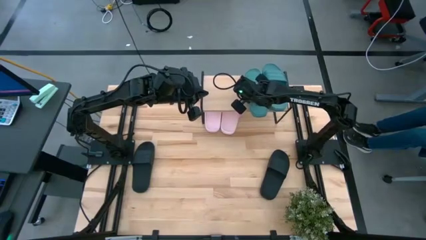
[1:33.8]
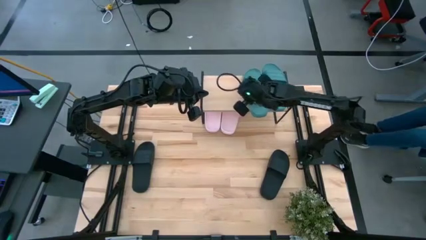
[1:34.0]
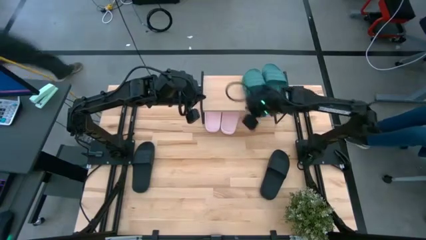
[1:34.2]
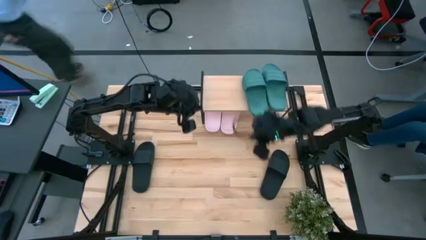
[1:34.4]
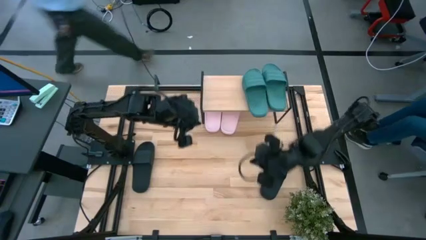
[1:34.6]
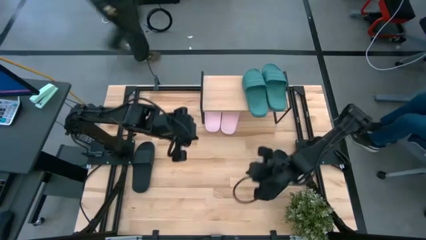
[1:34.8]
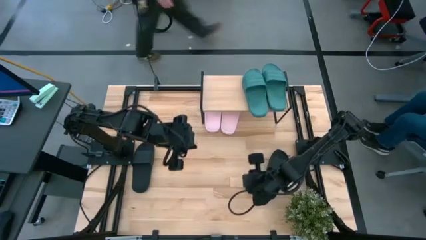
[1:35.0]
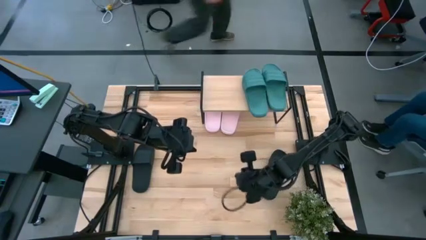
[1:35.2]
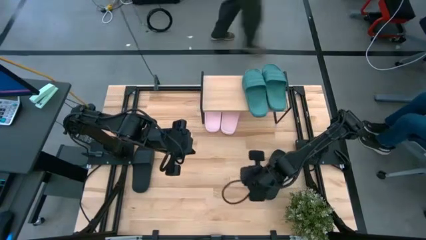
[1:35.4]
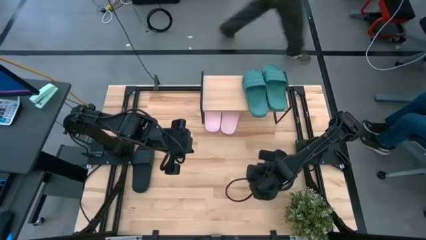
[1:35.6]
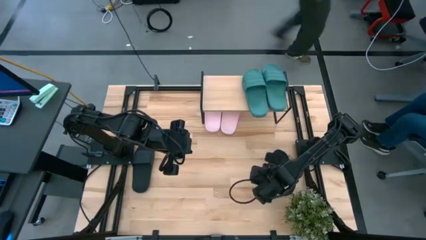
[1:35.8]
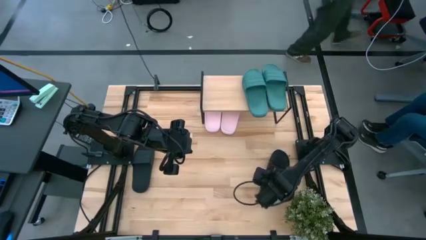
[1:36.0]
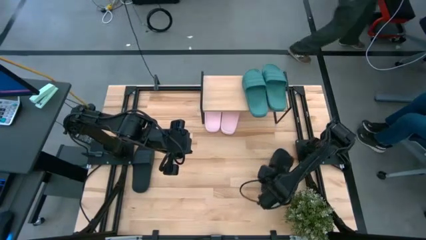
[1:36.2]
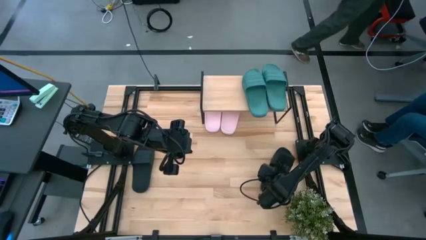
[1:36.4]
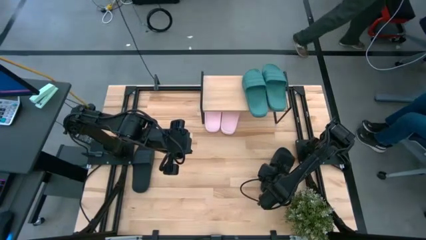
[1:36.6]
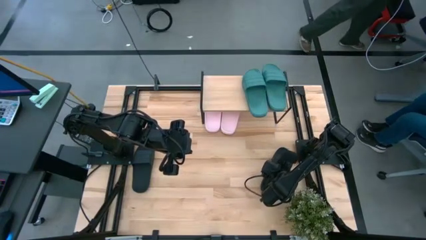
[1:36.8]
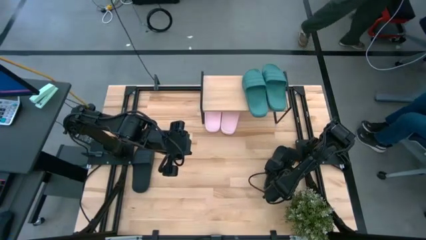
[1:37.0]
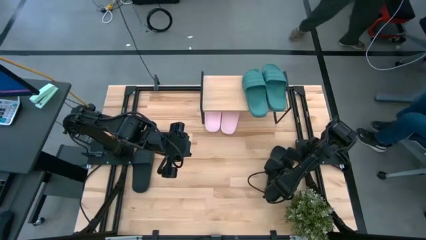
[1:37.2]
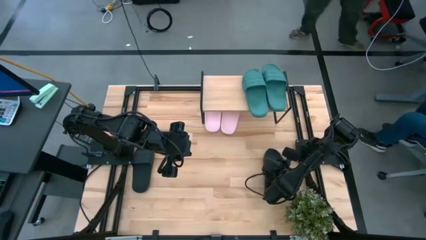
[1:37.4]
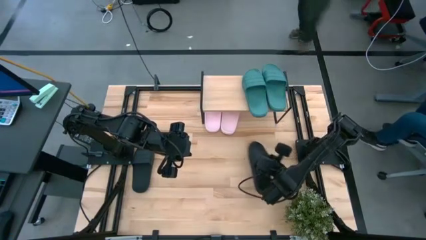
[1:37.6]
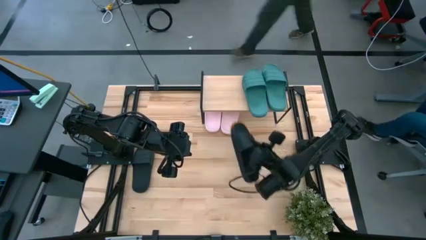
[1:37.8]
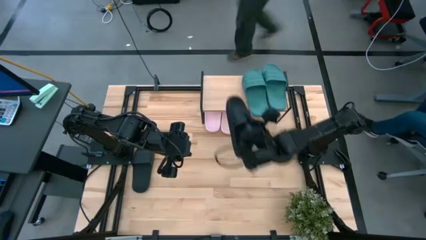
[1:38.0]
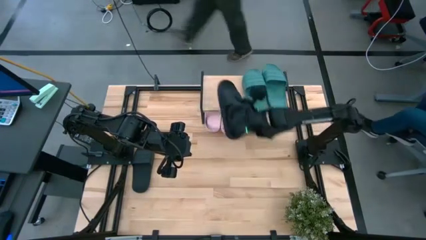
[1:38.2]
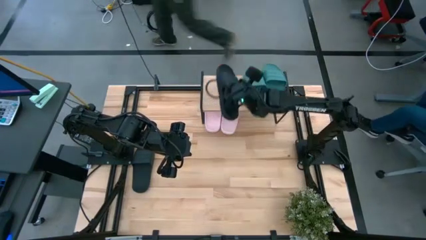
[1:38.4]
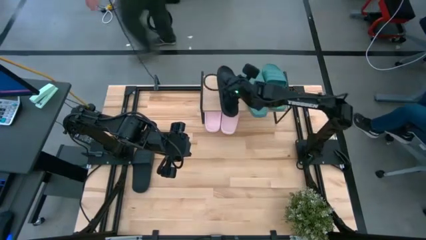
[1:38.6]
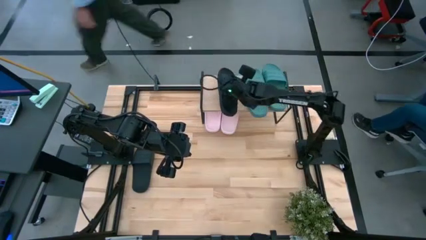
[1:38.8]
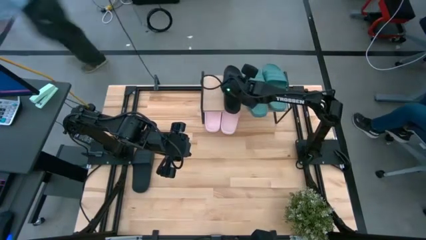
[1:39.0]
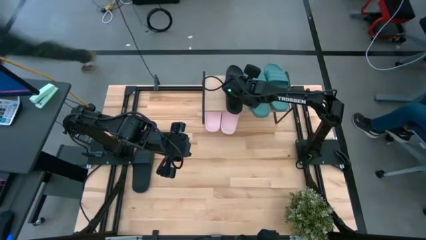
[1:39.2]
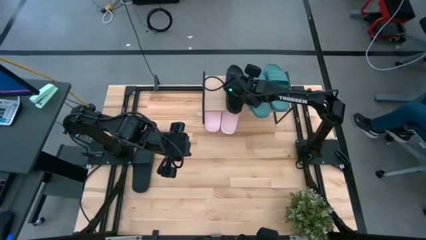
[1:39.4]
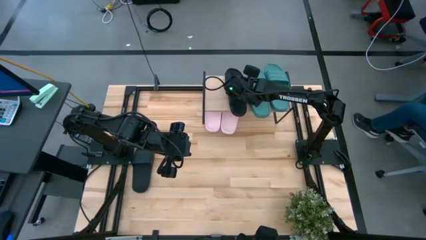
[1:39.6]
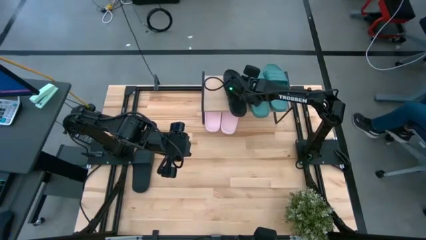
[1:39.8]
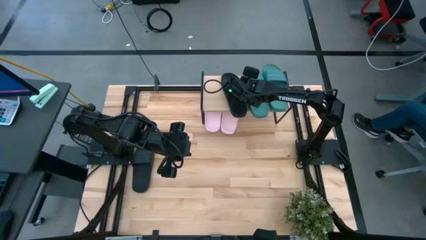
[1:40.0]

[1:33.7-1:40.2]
Task: Pick and place slides into the shelf
Put the right black slides on the shelf

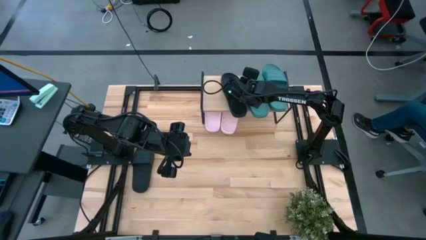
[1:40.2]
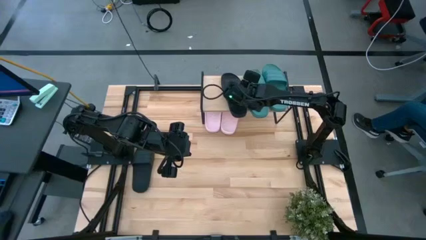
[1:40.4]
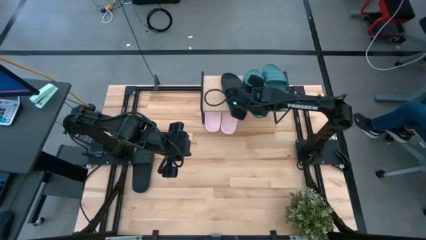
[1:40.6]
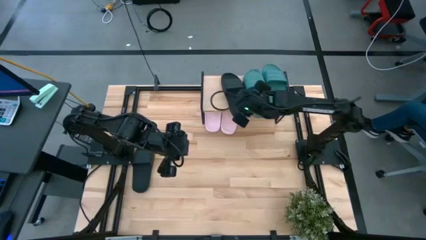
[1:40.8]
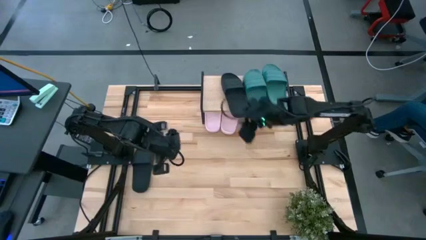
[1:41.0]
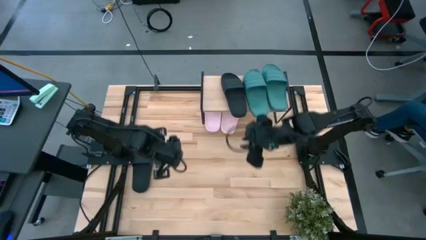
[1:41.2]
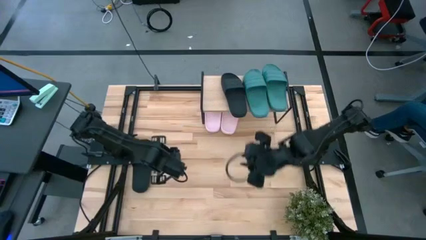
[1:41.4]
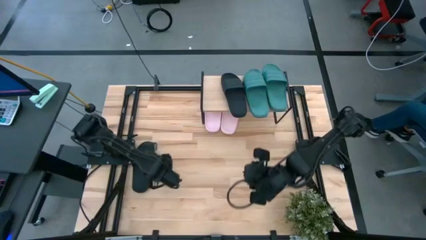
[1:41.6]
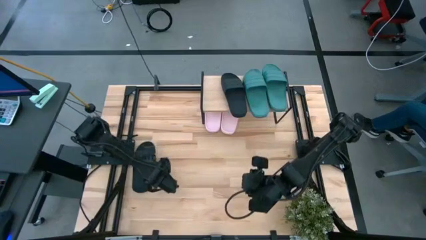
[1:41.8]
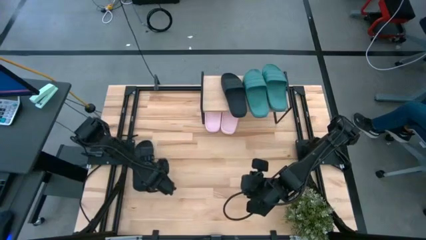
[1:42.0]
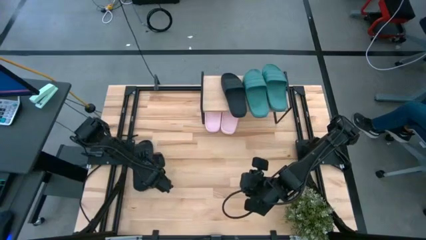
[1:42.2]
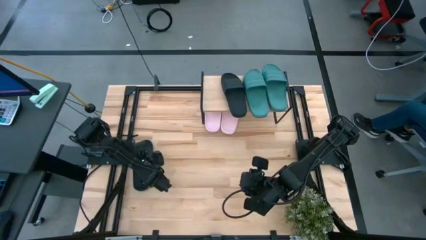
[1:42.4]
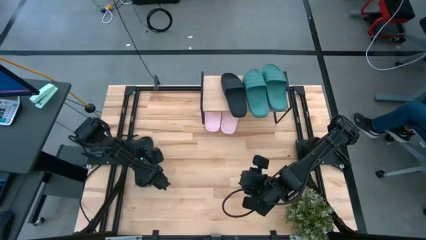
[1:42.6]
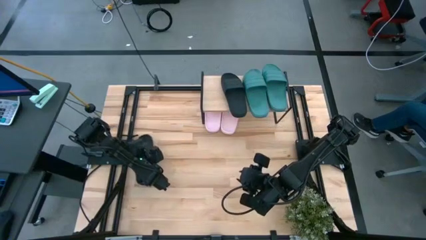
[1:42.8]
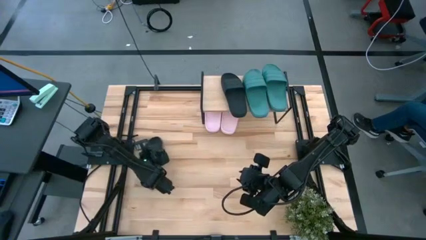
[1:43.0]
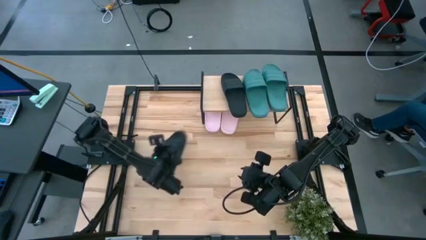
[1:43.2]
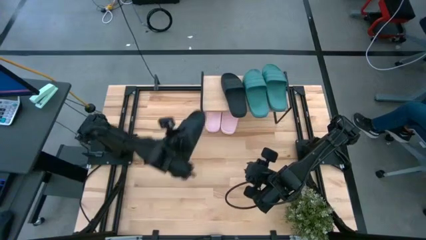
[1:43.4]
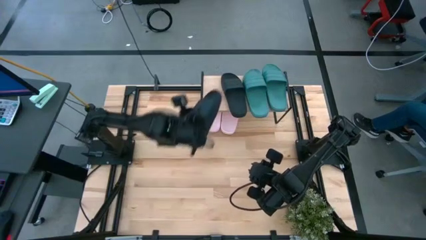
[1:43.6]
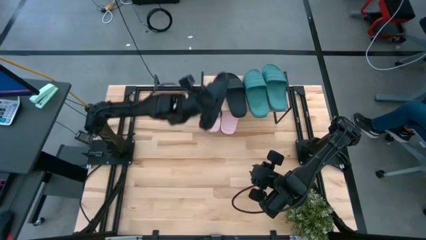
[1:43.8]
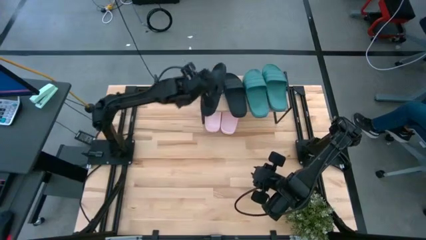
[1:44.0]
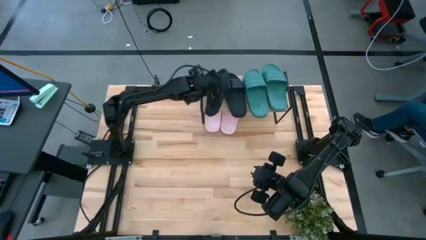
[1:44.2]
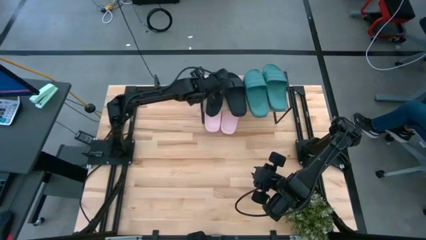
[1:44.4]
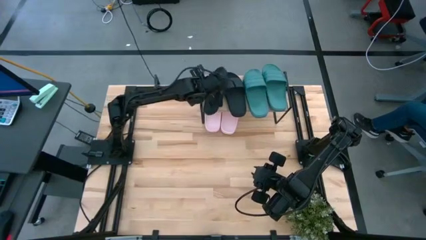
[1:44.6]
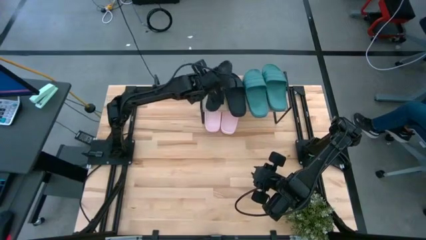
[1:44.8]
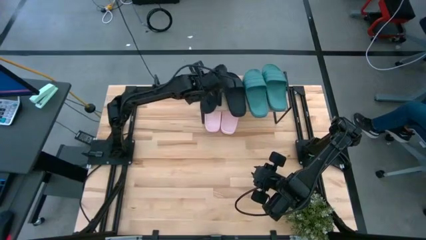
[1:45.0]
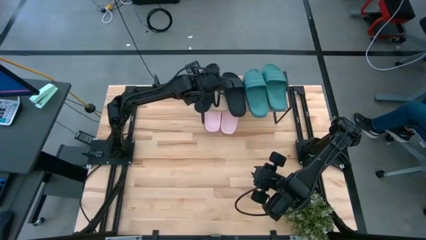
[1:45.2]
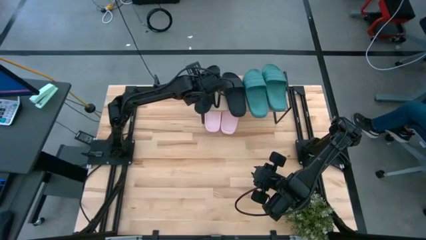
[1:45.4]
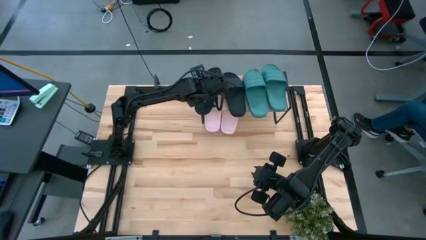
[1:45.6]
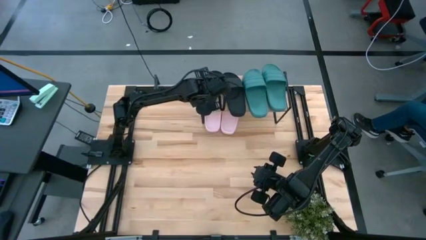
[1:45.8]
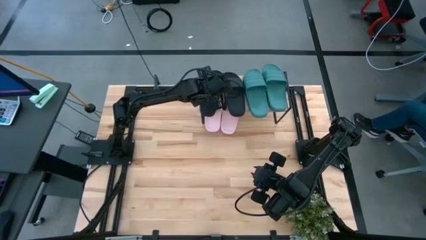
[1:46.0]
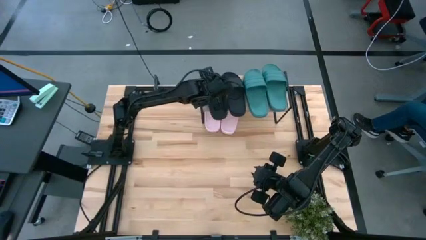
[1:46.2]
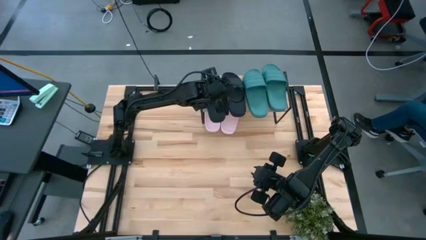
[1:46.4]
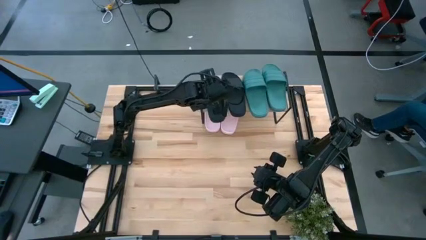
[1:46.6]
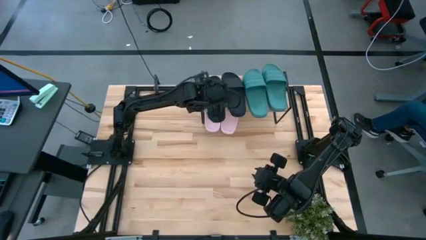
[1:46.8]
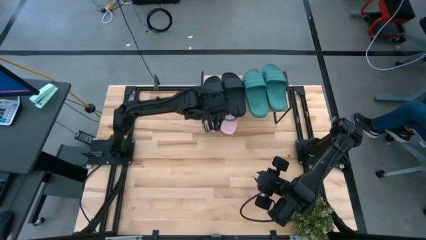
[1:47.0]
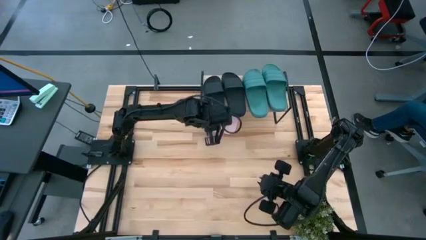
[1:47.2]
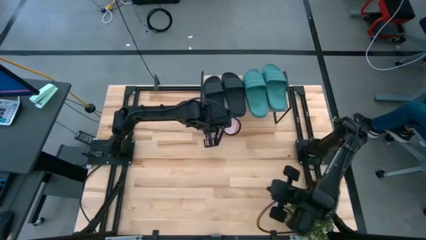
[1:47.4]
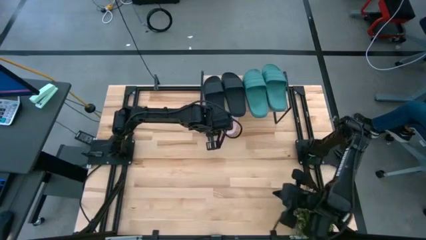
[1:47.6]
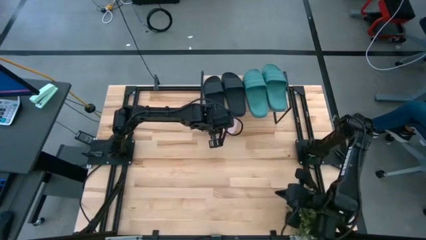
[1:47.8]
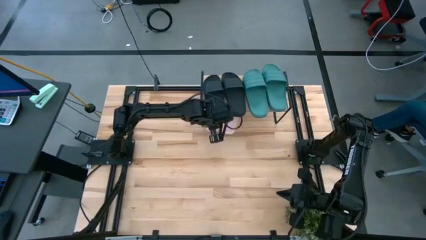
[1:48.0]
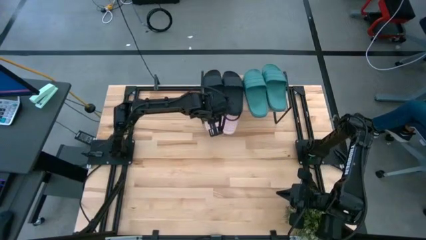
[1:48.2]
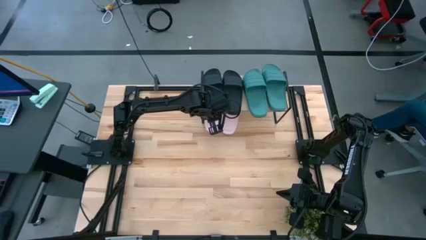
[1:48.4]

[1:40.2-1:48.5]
Put the black slides on the shelf

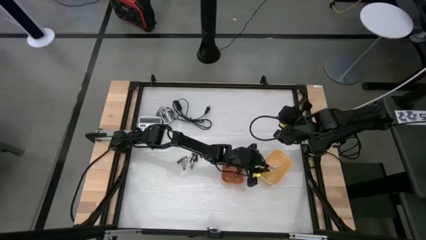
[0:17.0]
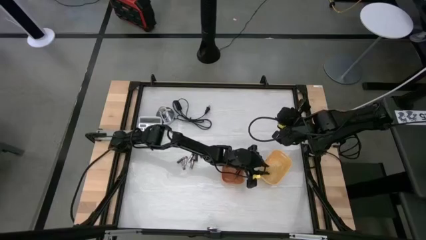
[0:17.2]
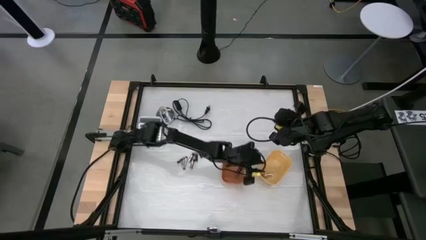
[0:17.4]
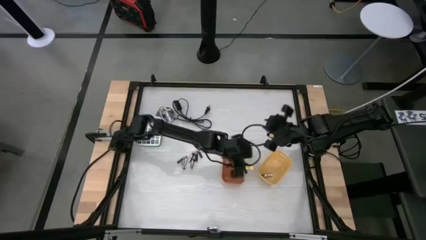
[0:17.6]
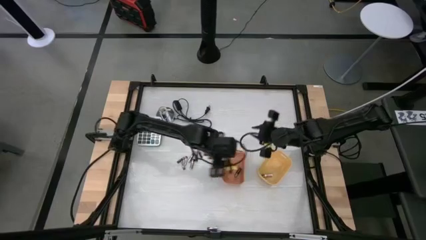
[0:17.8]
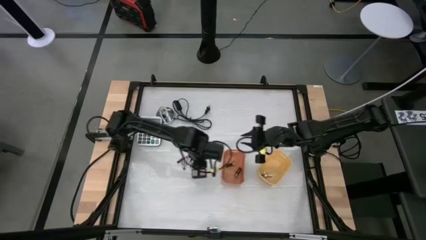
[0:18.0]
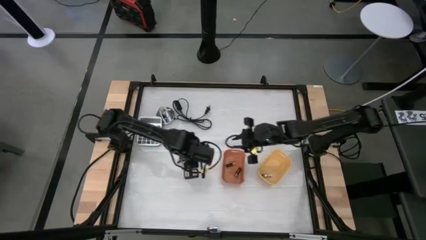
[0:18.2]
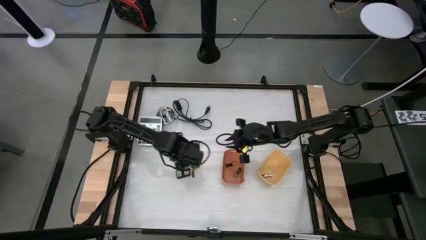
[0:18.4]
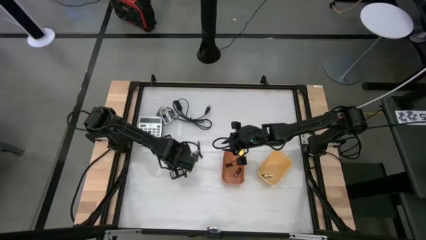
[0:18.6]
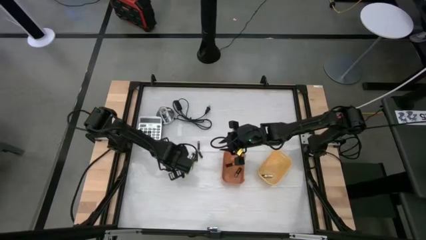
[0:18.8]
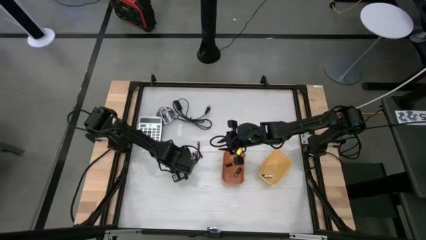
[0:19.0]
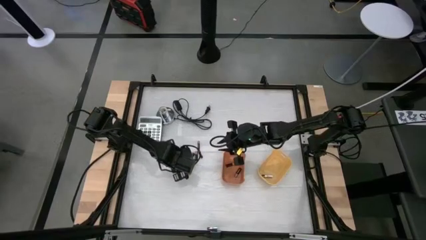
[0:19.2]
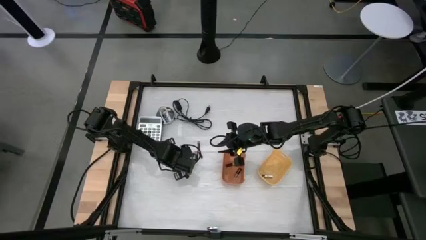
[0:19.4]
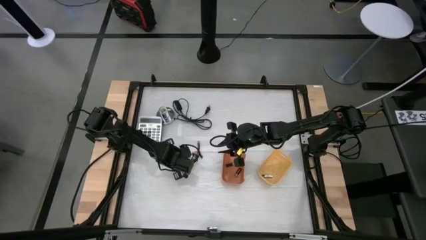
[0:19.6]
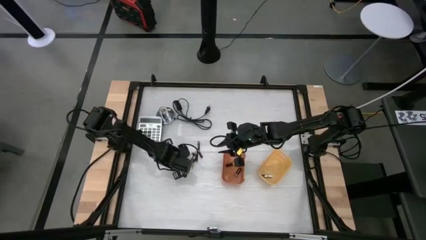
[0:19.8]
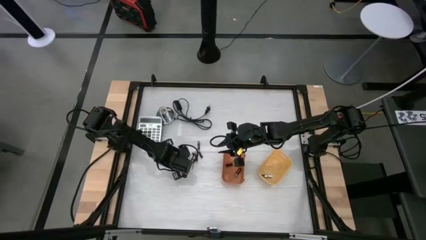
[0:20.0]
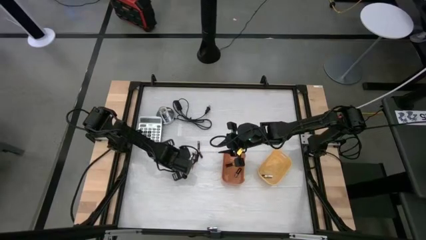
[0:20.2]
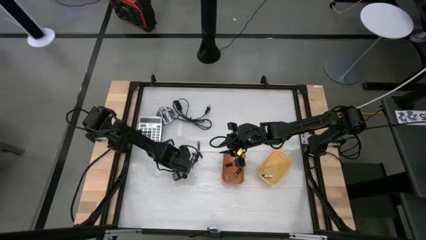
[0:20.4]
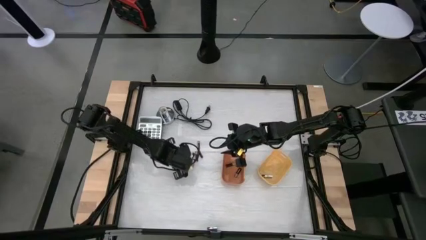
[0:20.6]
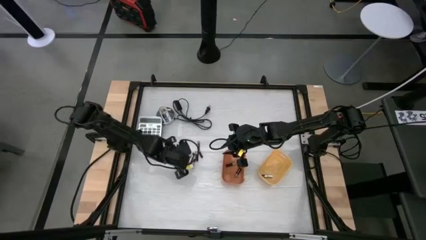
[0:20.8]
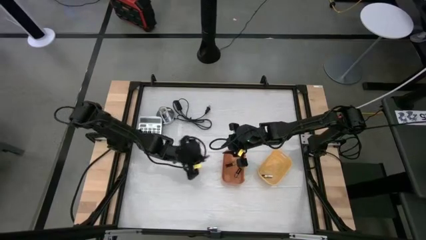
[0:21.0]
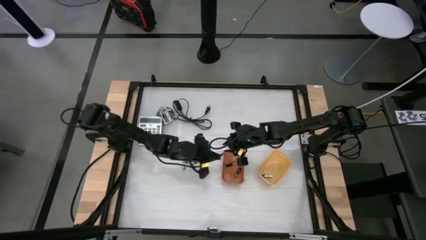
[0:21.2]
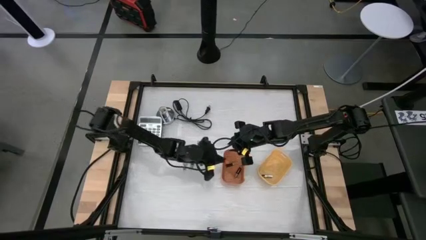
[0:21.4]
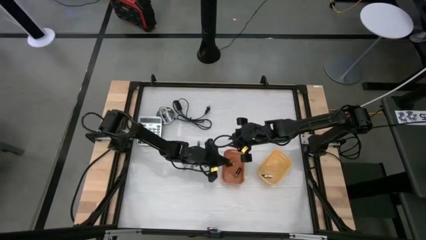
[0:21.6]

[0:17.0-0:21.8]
Task: Sort batteries
Put the black battery into the orange bin
